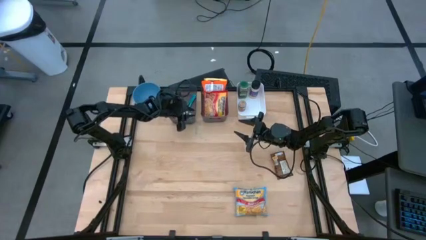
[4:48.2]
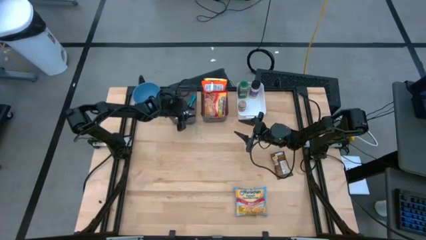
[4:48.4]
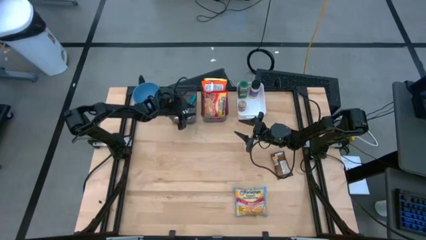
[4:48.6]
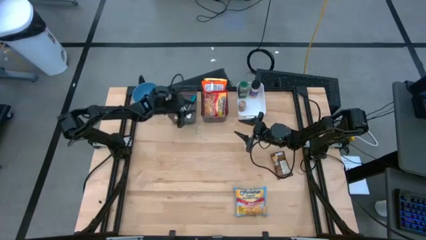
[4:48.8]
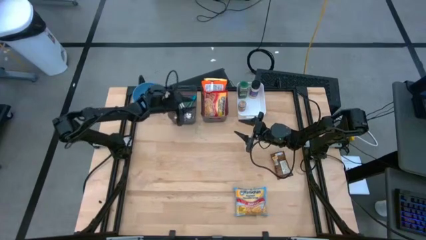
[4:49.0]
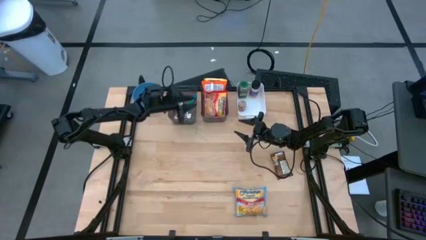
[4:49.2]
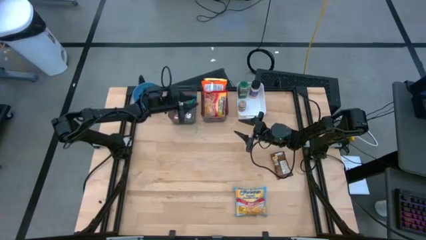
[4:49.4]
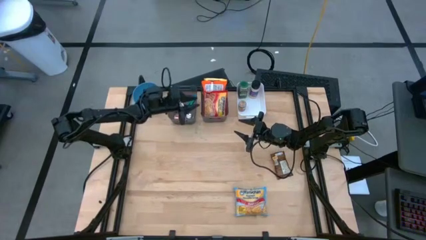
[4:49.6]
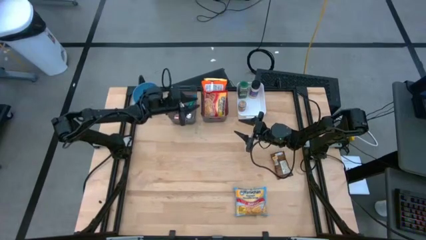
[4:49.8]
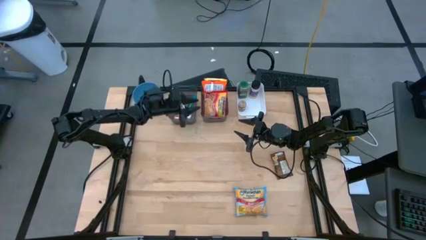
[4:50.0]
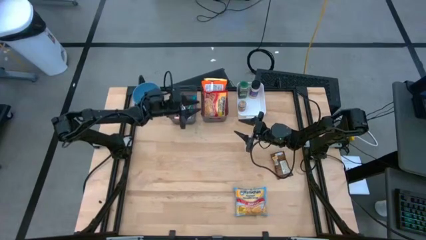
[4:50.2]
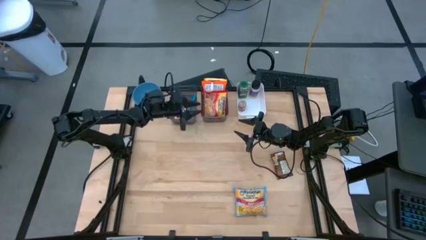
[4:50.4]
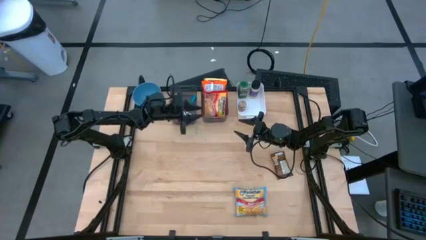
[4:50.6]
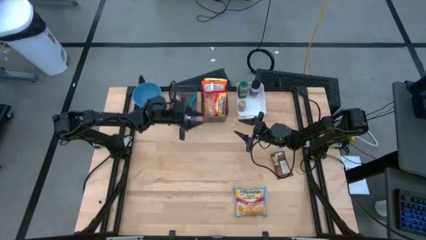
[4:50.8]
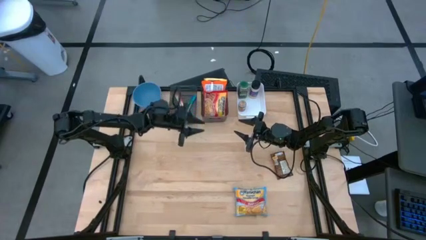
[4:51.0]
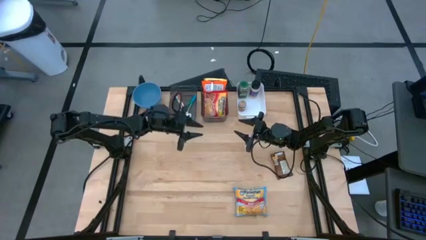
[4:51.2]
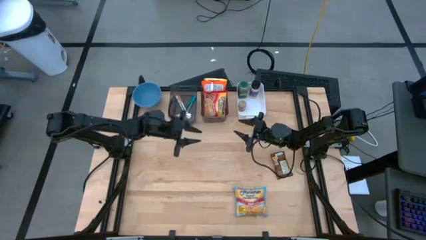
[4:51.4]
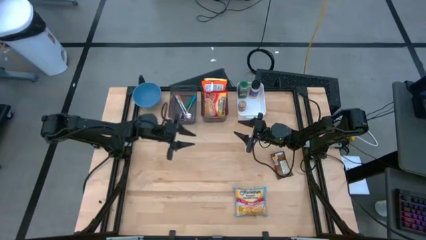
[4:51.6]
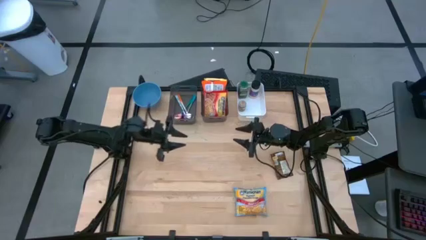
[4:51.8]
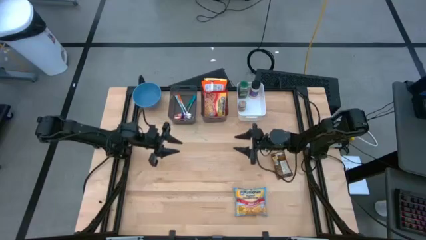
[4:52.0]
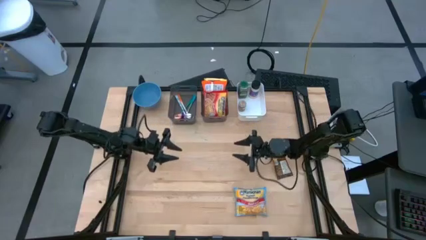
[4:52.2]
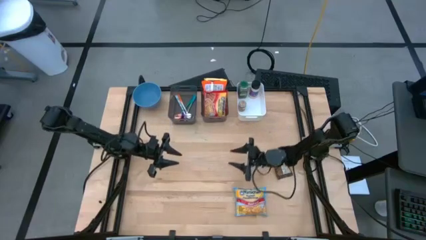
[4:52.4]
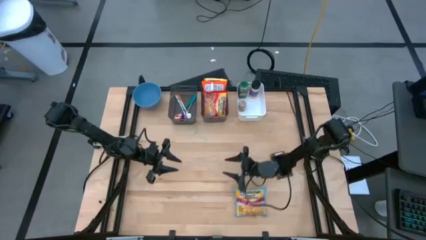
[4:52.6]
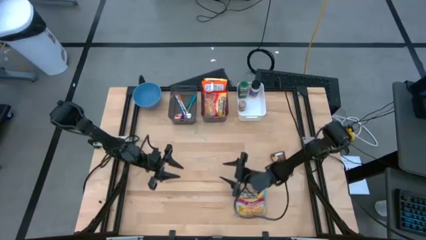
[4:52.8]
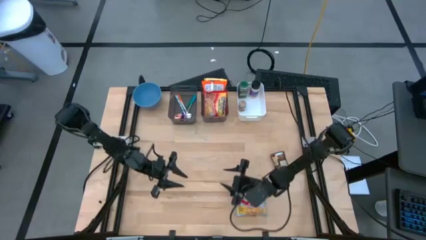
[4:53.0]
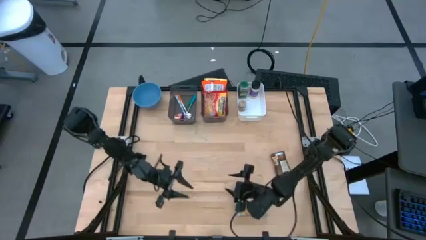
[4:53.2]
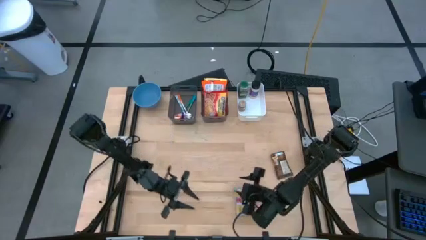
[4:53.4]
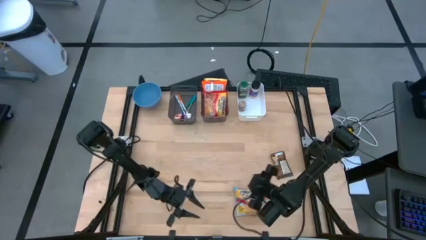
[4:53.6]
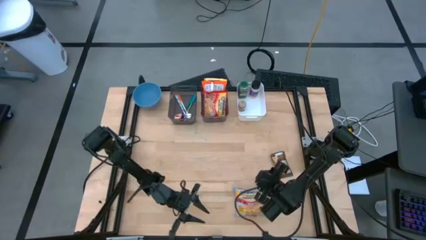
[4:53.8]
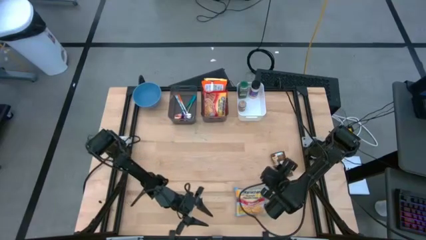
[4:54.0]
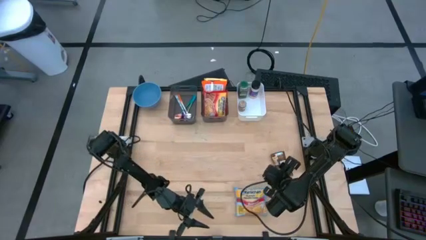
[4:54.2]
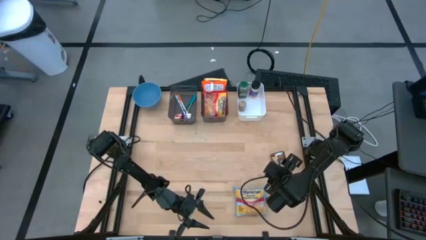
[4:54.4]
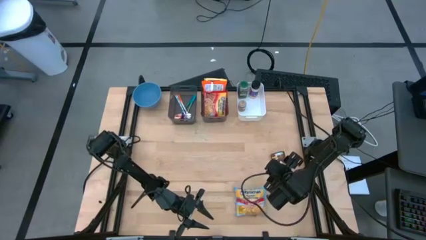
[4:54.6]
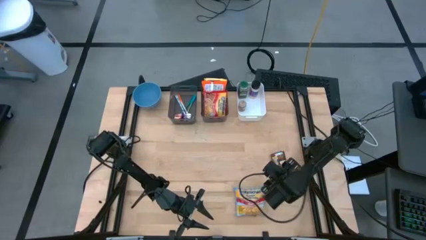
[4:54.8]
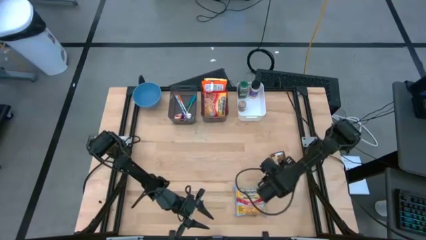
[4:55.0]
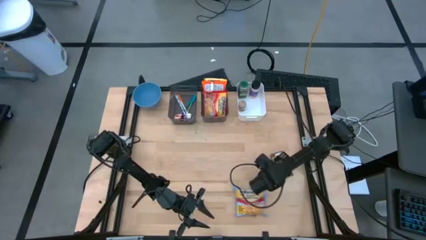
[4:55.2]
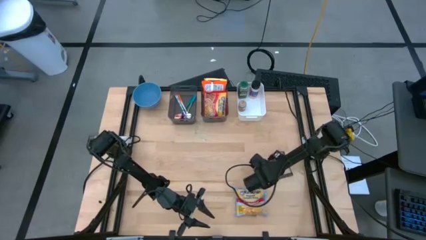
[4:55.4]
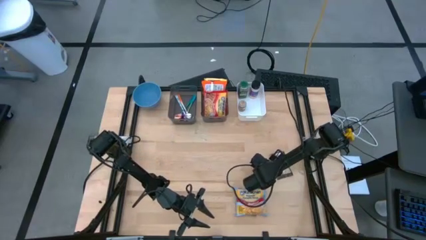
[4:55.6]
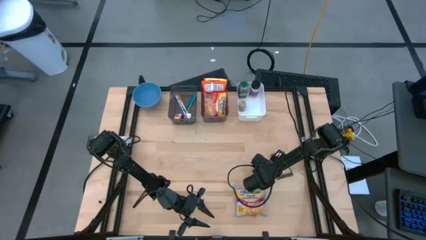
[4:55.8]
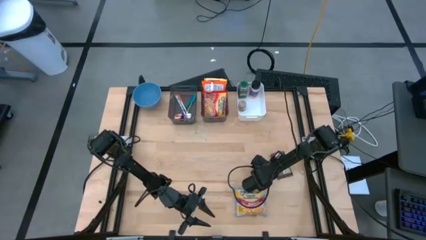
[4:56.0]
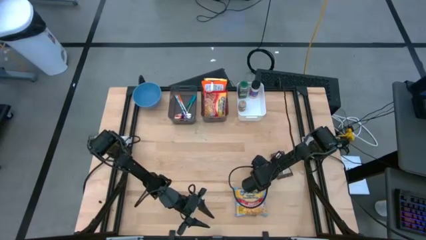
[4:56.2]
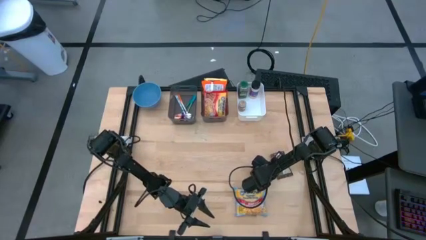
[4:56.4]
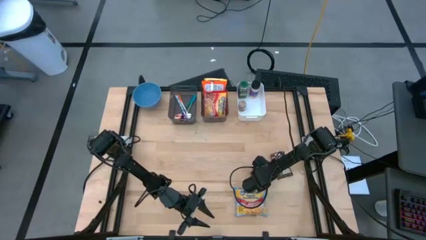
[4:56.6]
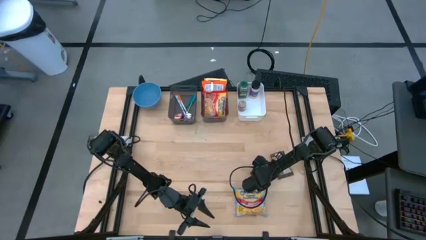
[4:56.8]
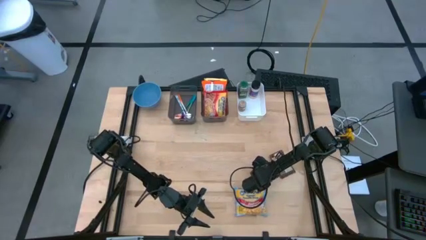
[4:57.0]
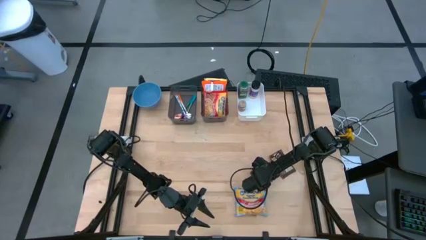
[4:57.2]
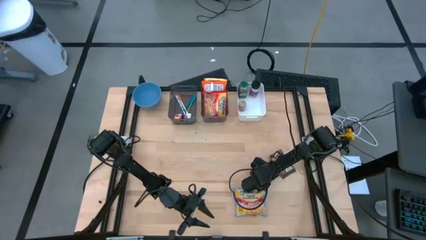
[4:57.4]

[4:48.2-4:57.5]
Task: Pick & Place Food Item
Put the orange seasoning pack into the white bin

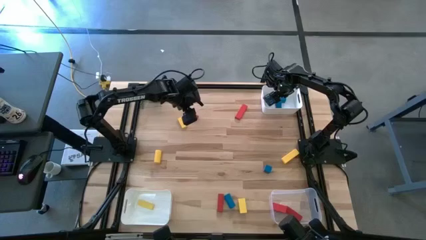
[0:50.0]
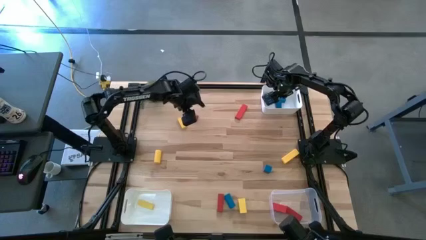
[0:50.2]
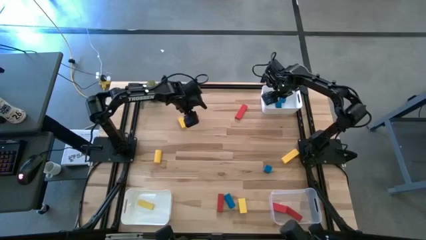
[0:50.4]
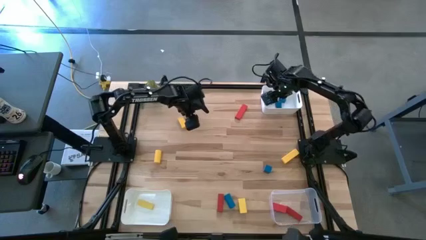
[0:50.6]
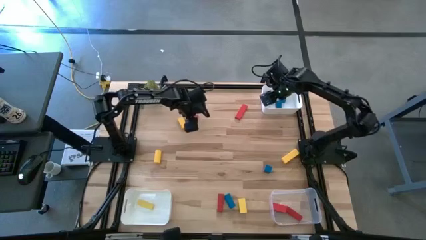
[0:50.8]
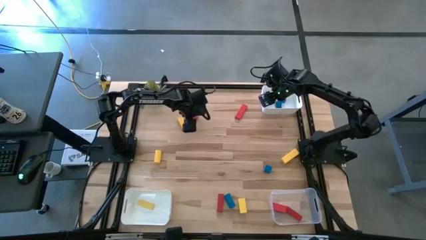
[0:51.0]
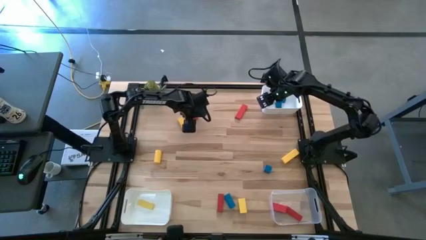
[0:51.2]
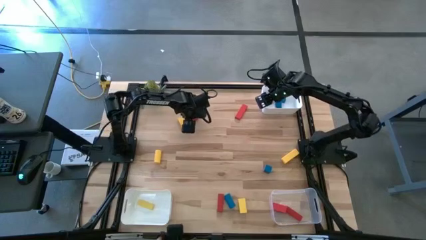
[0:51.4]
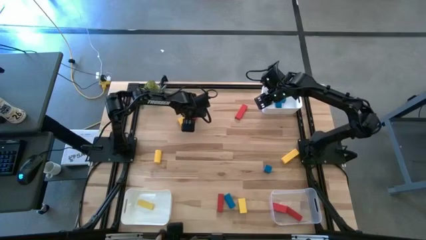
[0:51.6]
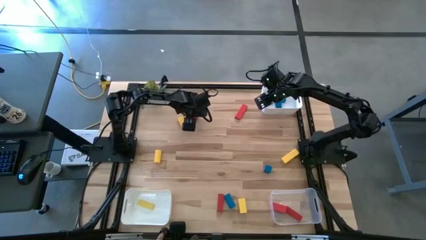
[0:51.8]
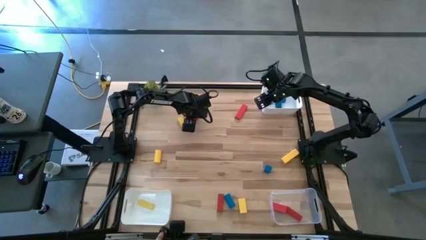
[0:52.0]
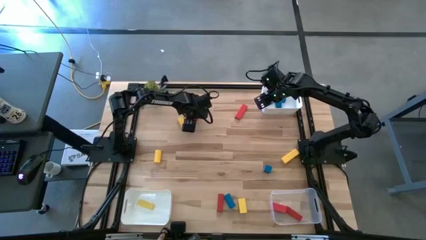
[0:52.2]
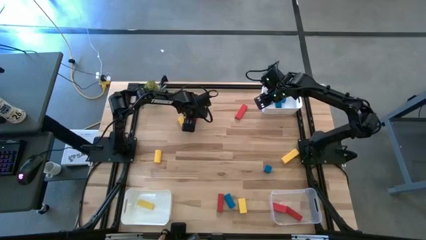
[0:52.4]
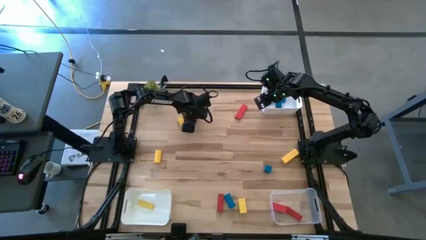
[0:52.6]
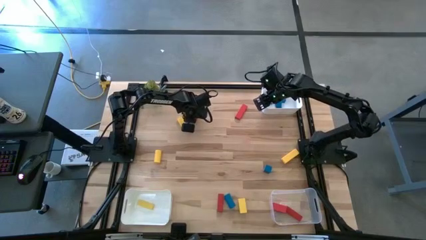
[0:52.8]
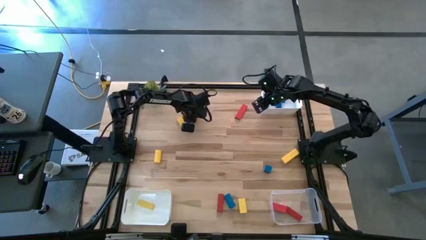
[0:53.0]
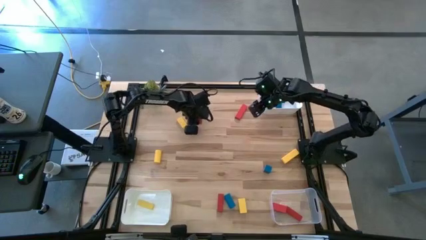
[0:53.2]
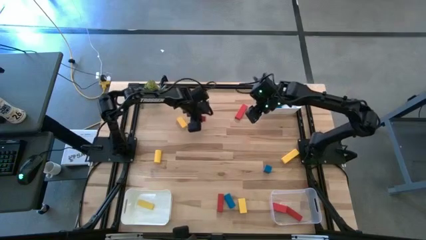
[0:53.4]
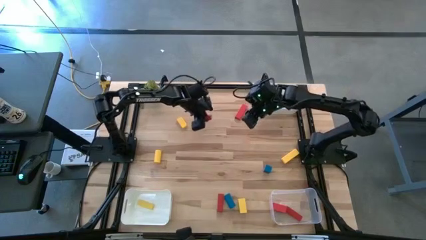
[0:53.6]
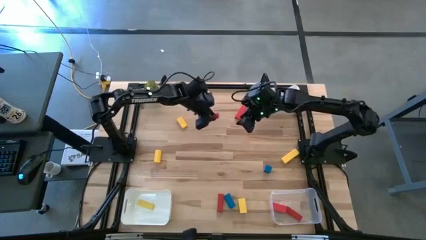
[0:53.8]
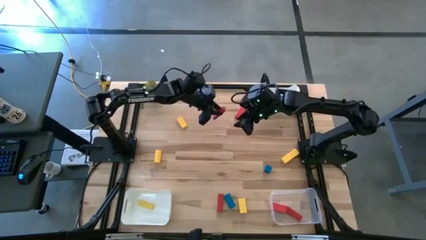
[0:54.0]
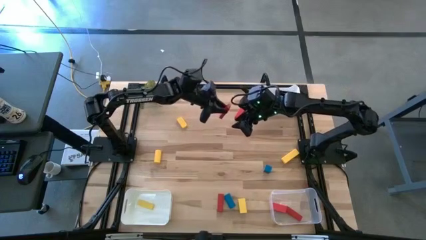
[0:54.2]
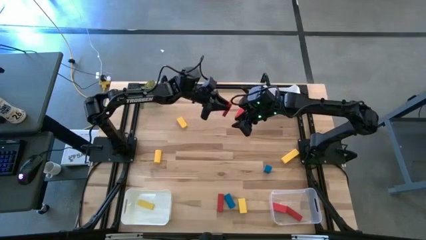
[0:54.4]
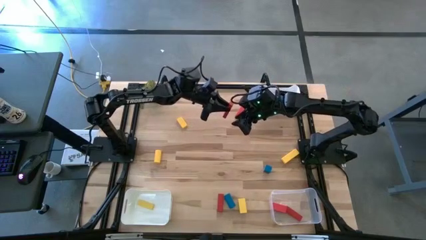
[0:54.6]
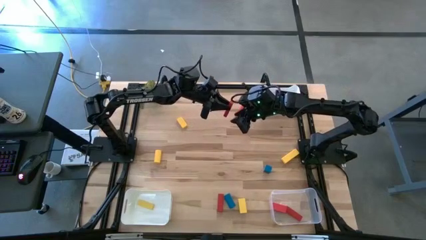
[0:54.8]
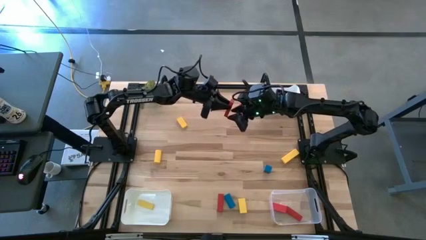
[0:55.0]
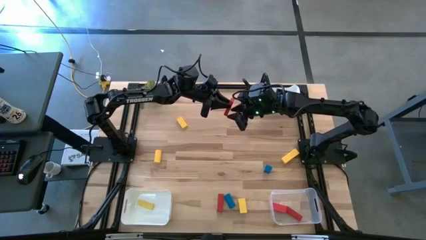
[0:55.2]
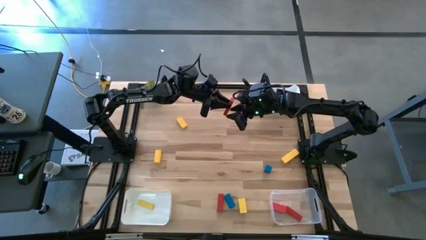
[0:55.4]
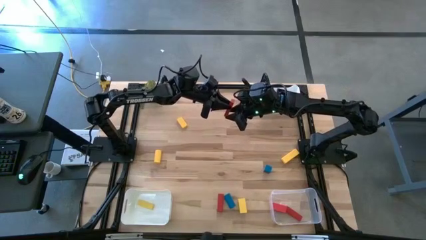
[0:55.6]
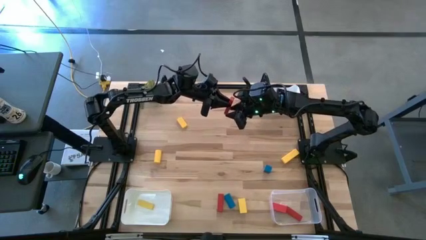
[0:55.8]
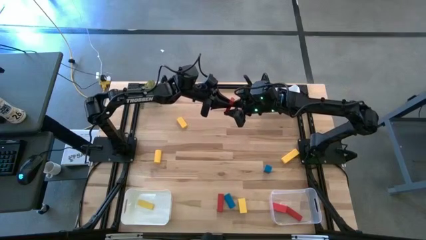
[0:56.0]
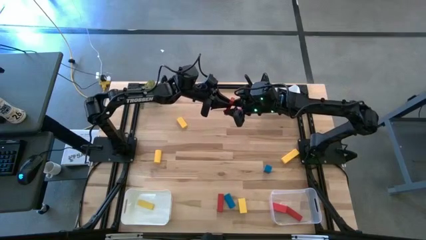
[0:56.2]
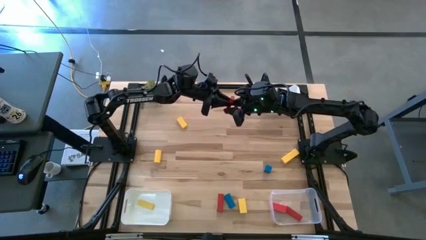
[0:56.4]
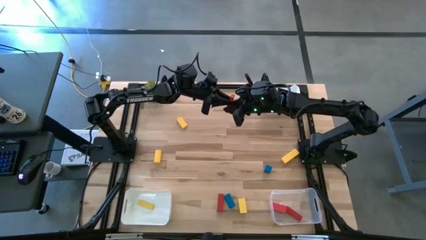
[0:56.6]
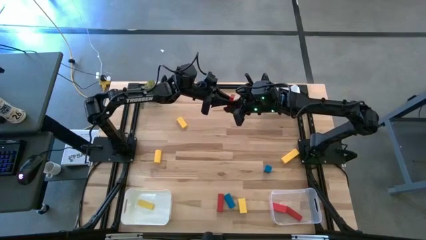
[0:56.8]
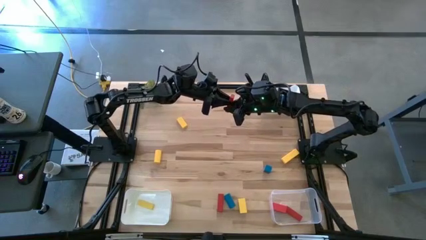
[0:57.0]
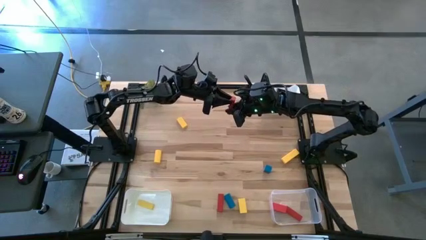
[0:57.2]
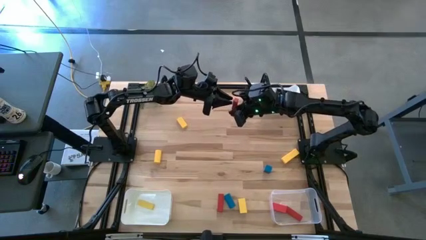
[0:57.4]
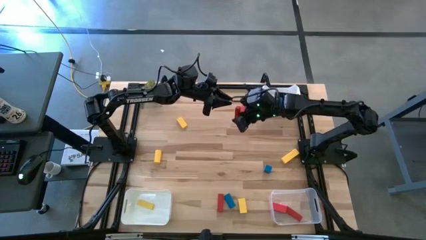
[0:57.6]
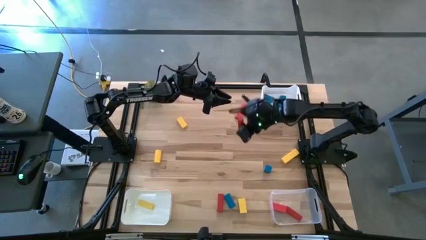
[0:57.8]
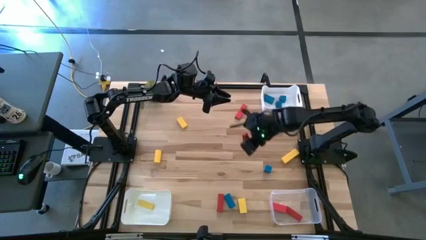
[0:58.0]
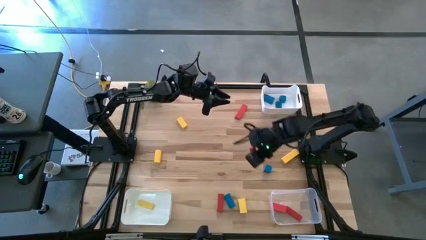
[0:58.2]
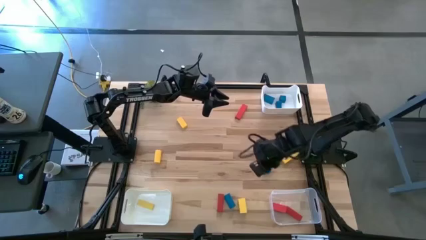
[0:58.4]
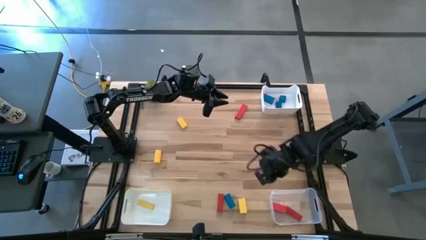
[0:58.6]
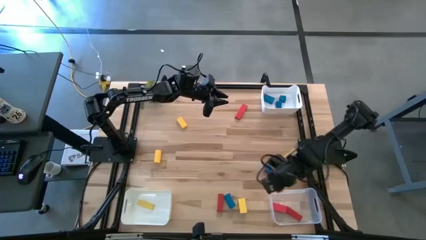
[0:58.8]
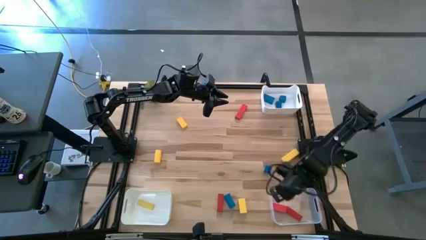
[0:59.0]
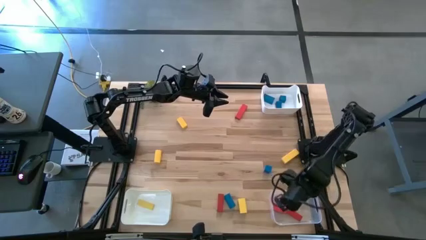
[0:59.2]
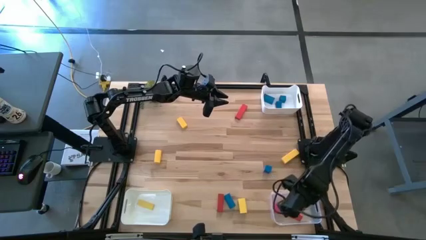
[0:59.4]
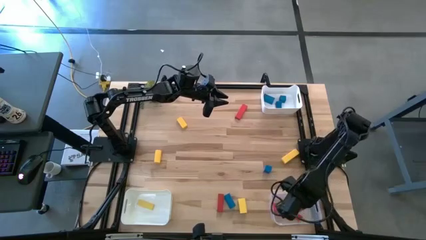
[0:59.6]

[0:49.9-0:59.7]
Task: Sort & place blocks by color
Put the red block into the transparent bin
